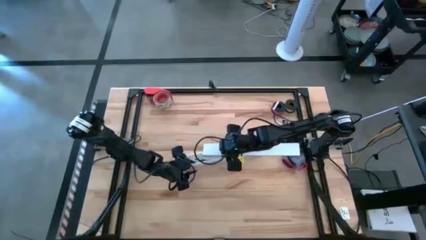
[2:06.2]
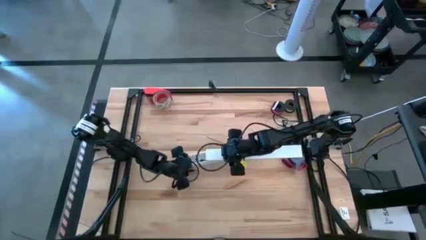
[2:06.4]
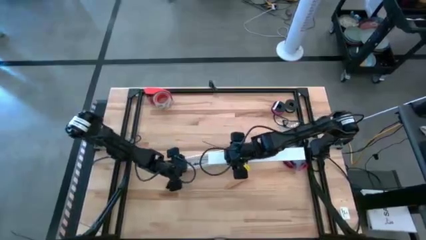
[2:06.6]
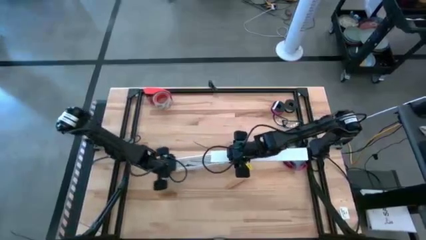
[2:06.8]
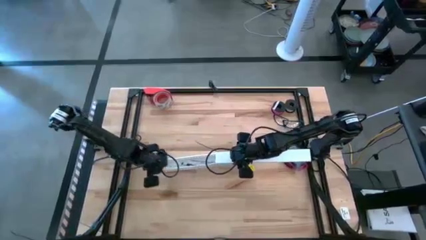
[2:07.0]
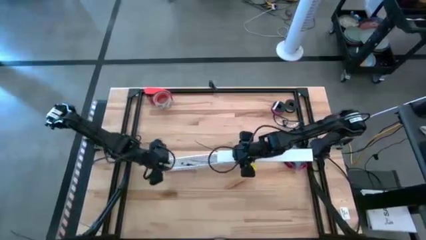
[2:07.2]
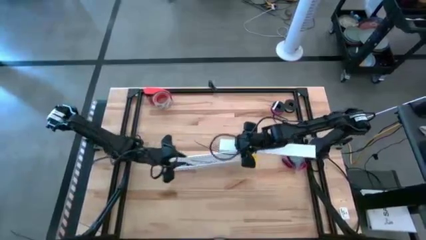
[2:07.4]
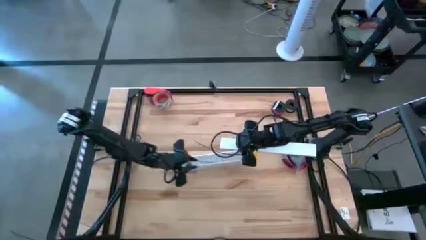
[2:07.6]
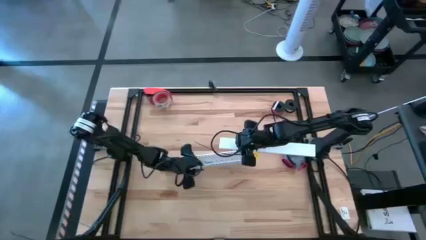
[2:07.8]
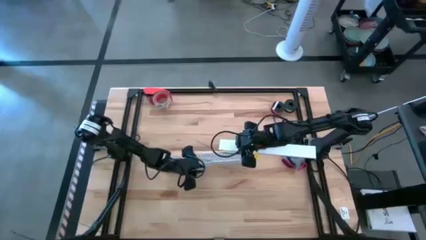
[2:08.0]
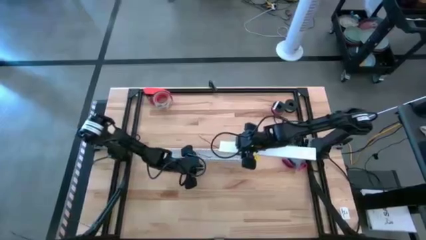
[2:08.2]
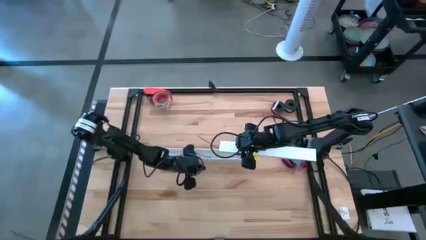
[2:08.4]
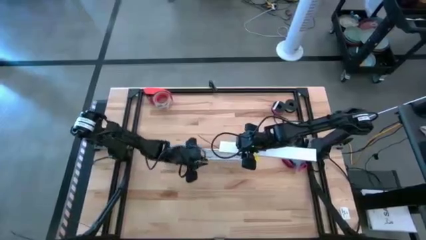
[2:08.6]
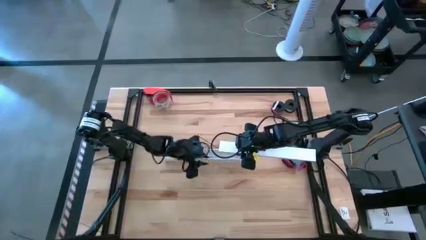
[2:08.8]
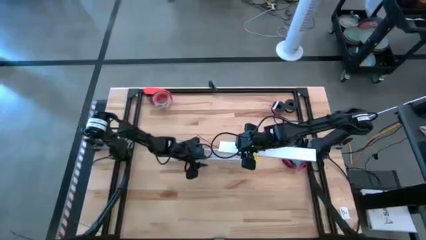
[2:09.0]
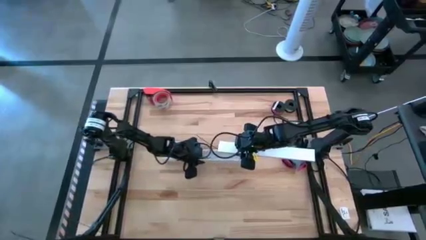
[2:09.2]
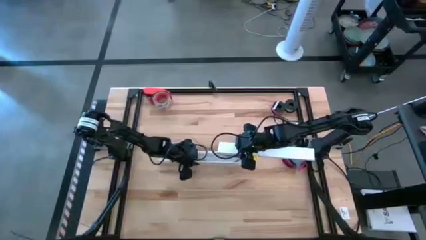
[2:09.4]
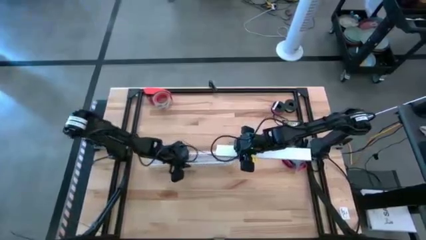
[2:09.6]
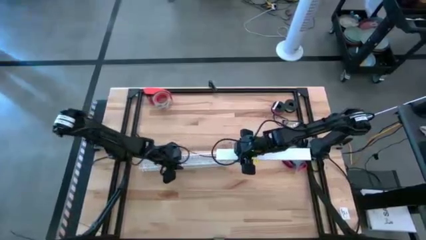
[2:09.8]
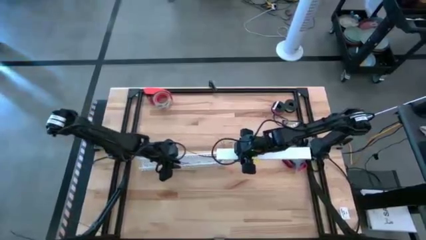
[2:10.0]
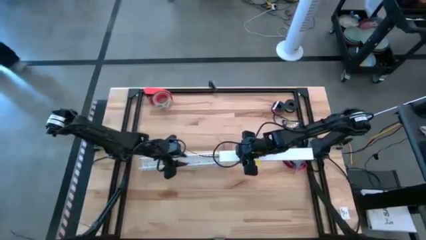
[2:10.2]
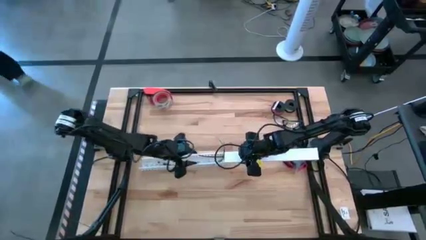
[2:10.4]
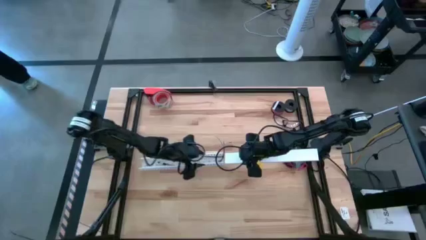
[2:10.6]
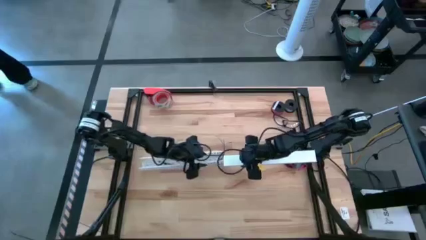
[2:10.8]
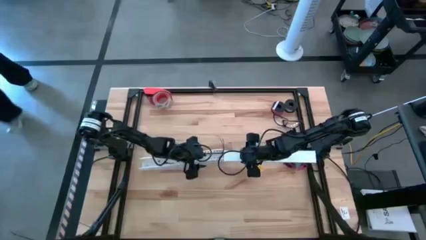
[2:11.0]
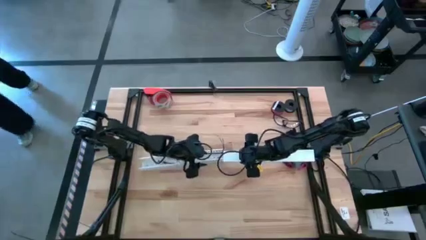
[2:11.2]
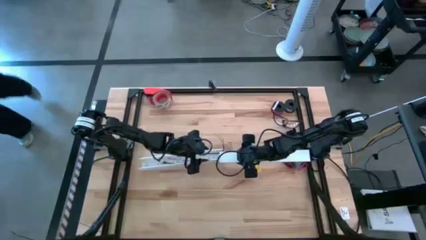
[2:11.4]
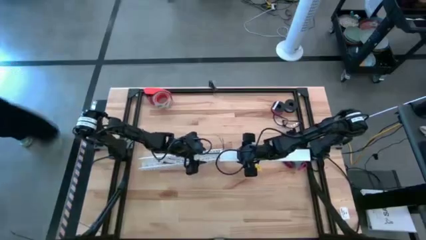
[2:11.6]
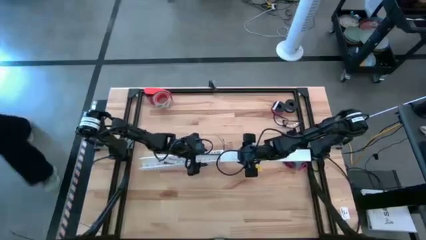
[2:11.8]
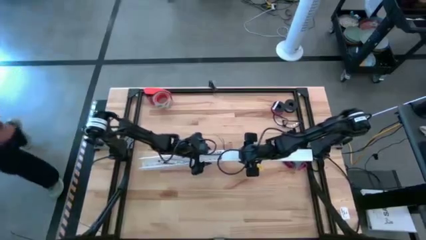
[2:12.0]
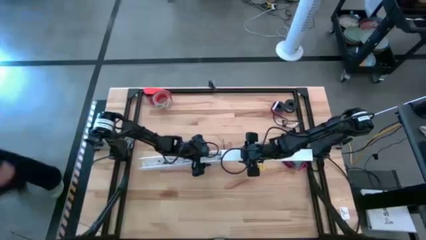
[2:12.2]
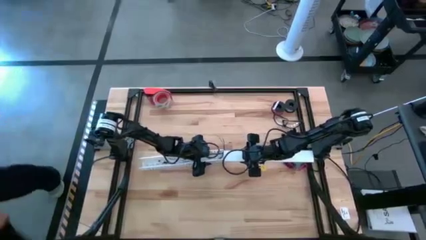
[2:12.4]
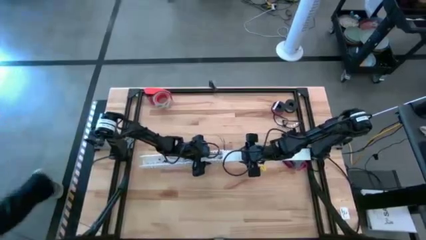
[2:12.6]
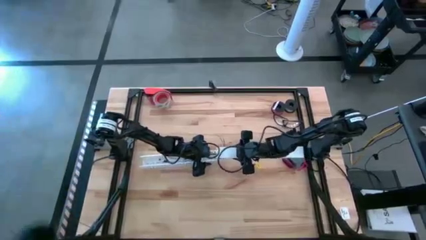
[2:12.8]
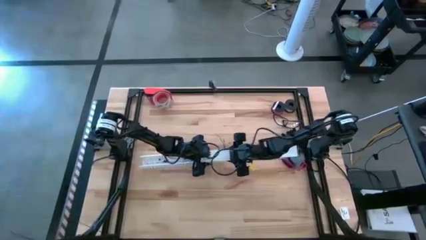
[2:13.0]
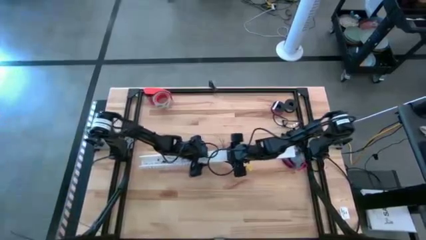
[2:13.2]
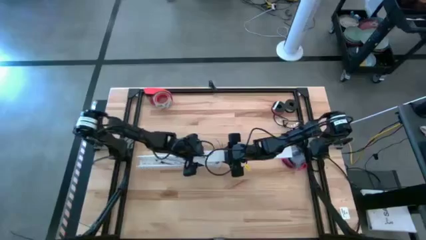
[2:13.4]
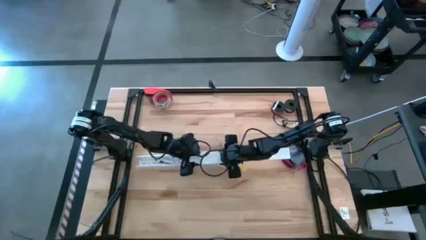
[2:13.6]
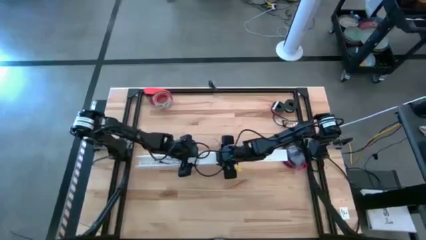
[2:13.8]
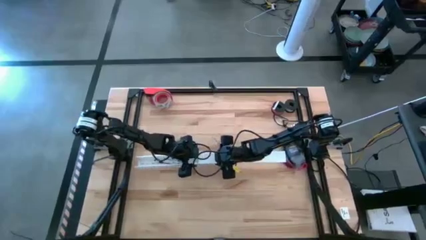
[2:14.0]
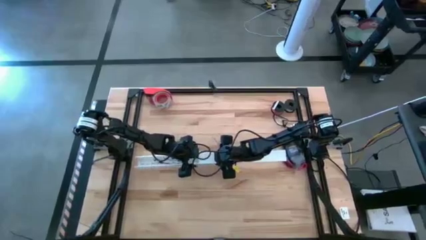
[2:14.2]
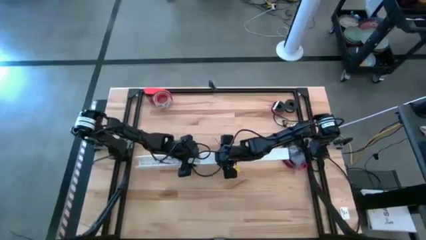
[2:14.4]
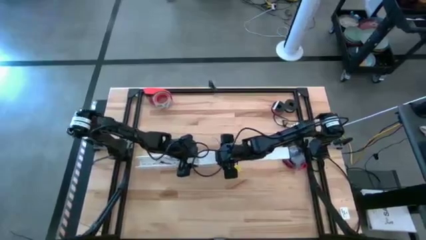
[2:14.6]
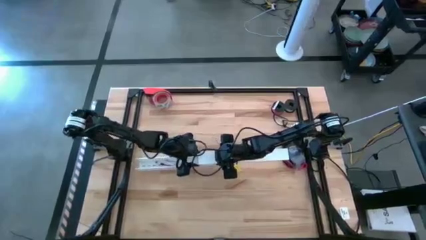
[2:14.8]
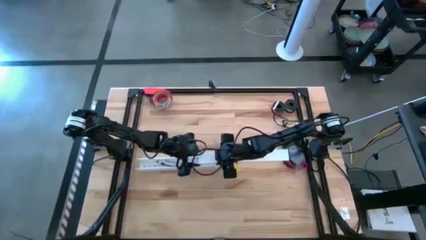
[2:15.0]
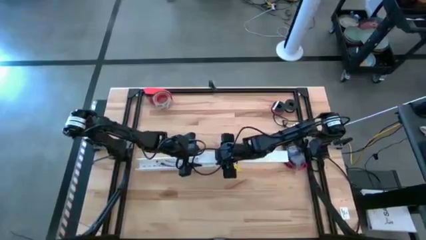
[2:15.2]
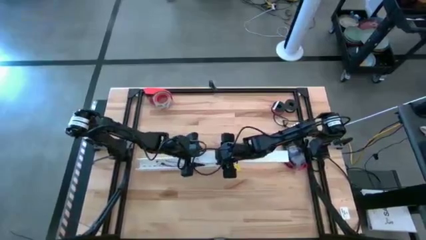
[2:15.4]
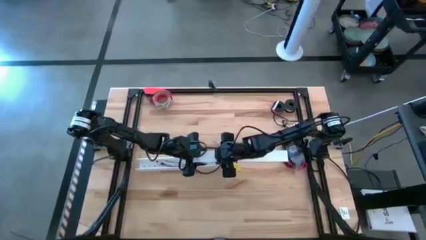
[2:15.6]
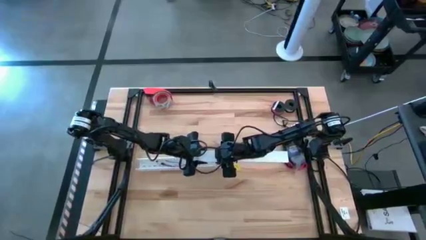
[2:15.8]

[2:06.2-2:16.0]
Task: Ziptie cables
Close the white cable duct

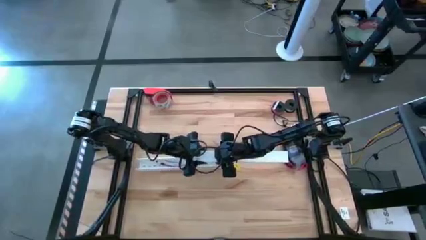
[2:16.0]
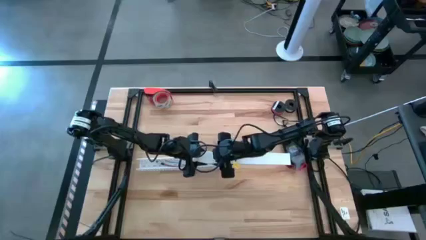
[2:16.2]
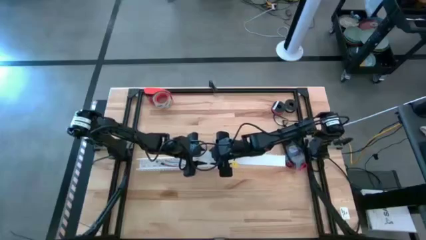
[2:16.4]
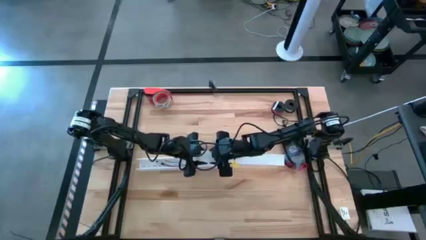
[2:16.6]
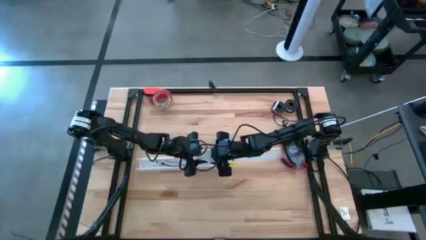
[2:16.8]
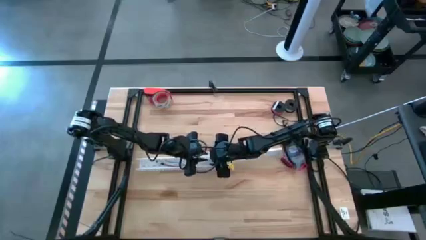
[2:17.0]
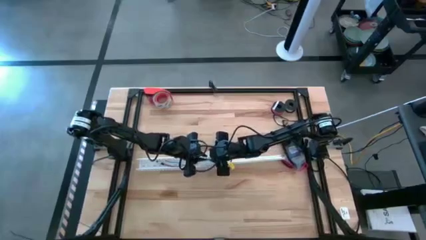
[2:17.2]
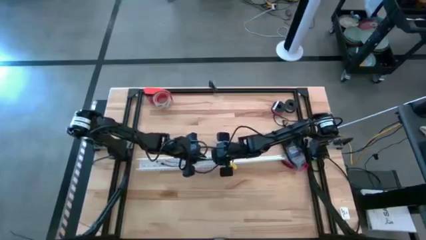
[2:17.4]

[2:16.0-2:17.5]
Close the white cable duct

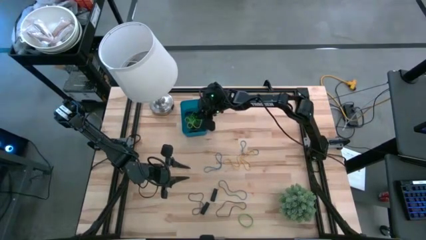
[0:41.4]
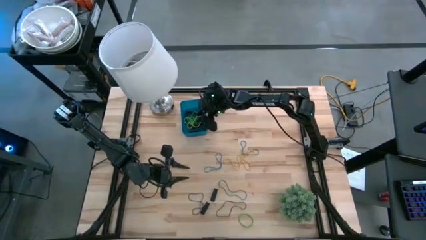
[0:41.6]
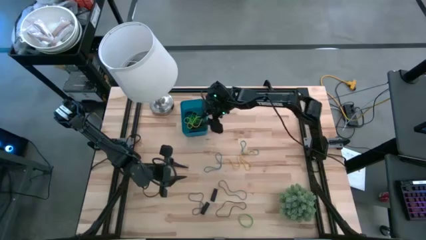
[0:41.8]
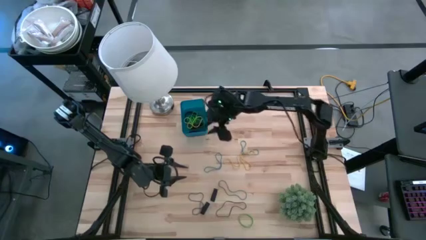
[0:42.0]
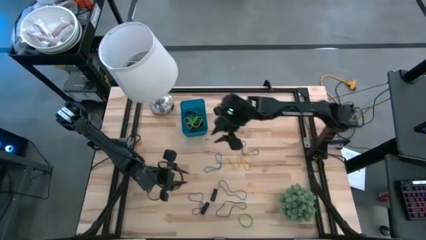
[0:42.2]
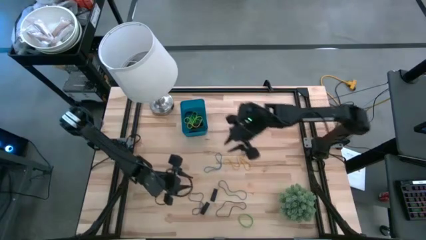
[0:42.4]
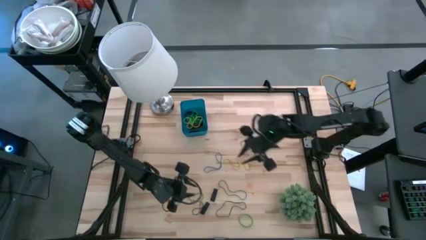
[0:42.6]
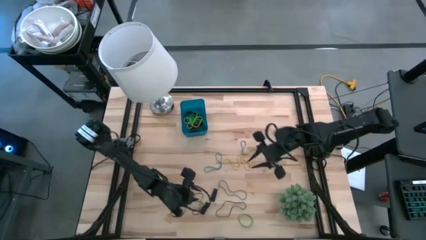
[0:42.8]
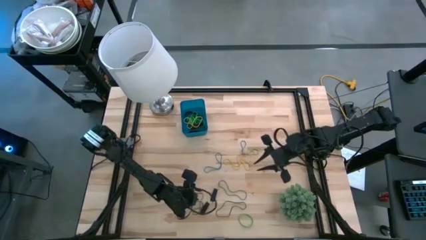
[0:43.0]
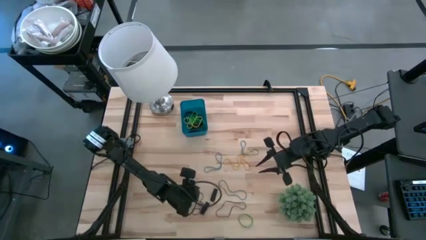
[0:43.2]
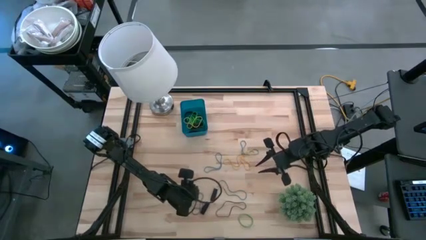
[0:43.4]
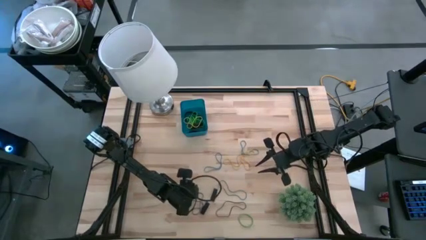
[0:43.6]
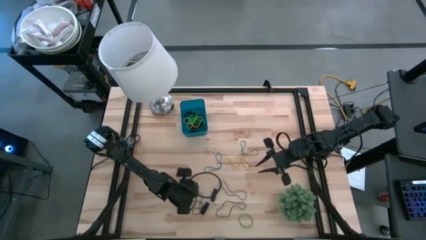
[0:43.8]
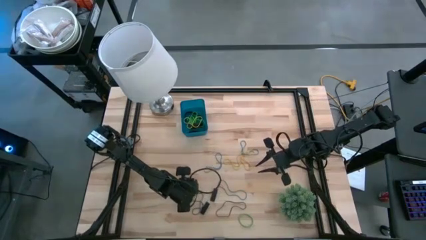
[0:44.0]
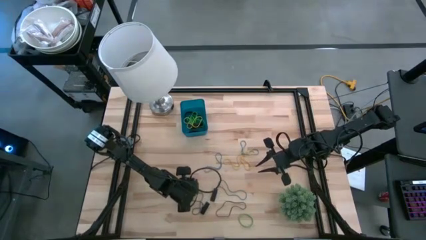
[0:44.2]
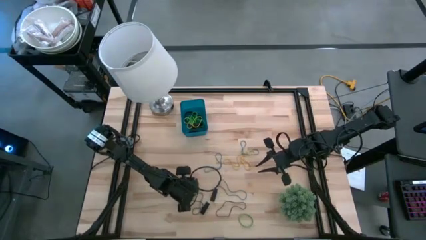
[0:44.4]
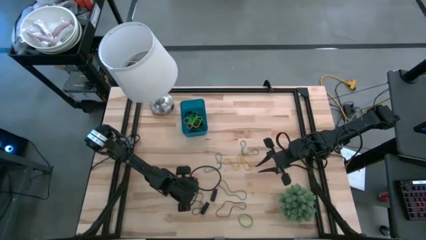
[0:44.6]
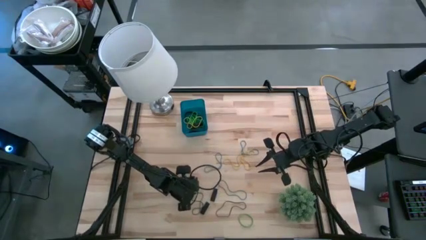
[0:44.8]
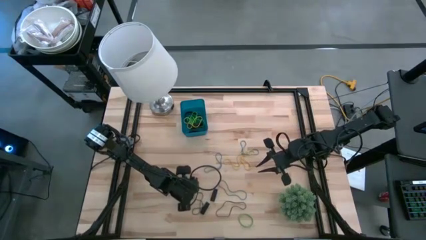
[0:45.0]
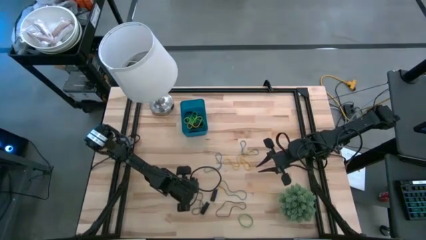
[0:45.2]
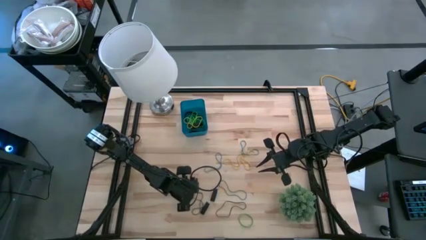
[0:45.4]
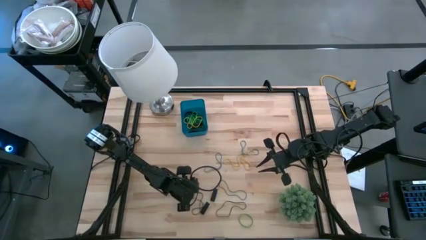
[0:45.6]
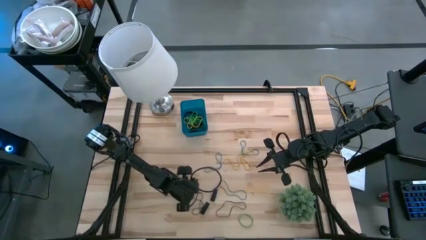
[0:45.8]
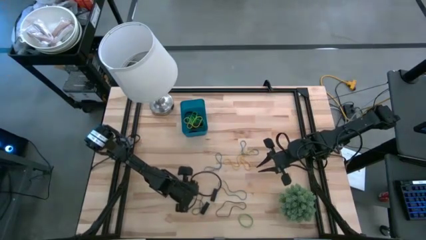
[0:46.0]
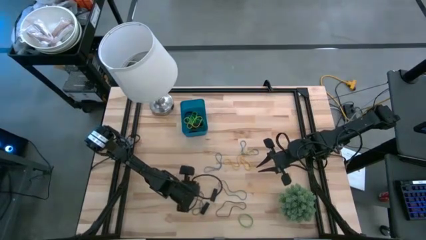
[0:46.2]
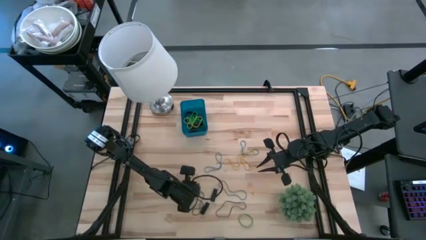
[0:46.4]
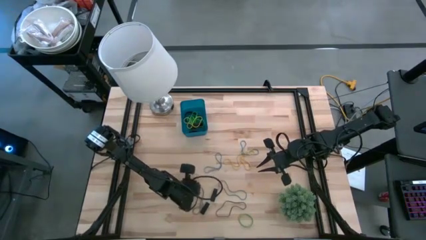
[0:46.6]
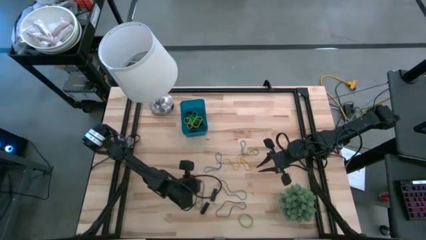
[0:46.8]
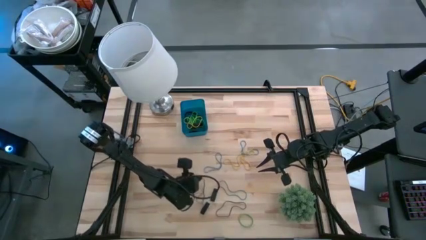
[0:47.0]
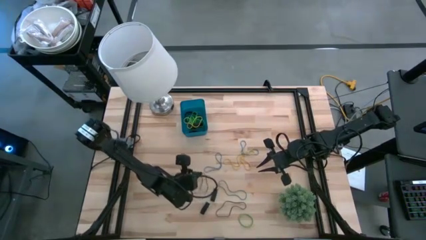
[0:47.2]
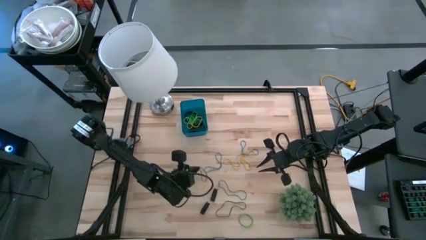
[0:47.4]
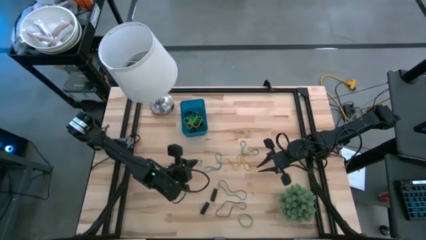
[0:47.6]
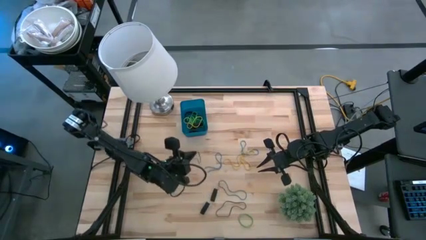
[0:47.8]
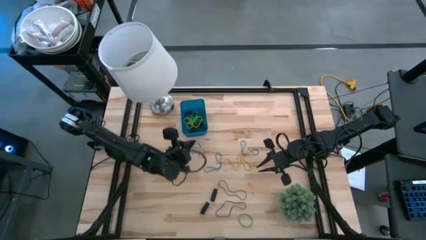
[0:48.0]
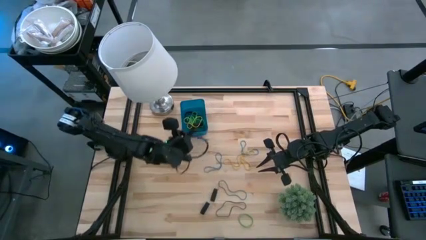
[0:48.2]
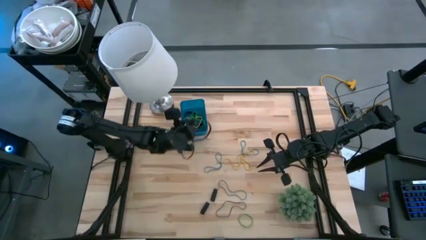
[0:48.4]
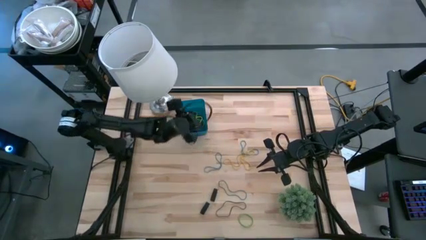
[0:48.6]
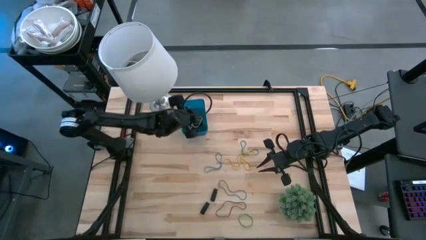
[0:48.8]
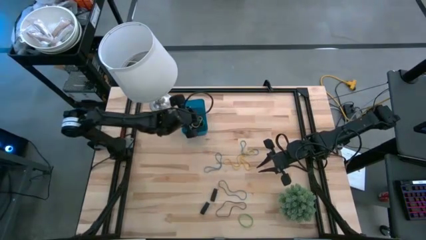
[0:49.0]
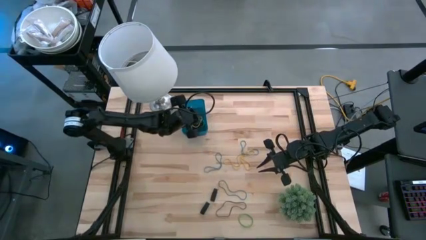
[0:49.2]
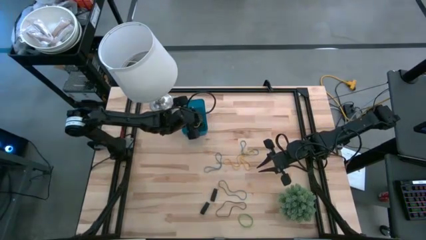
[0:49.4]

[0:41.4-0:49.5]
Task: Pick and place rubber bands into bin
Put the left purple rubber band into the blue bin
